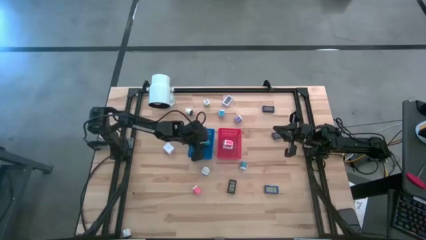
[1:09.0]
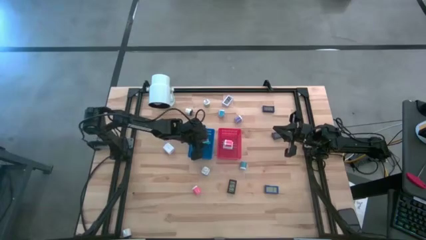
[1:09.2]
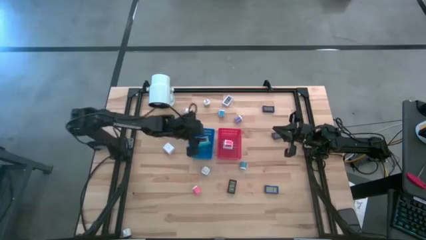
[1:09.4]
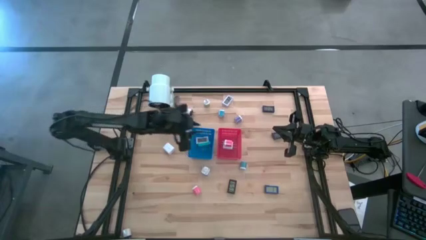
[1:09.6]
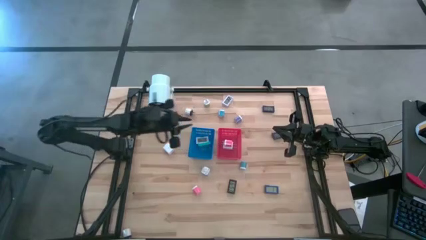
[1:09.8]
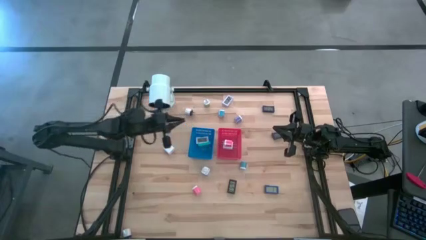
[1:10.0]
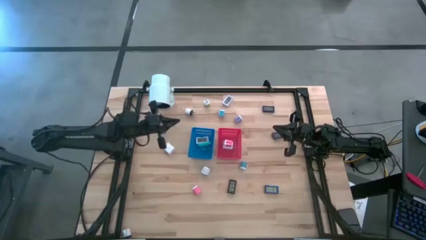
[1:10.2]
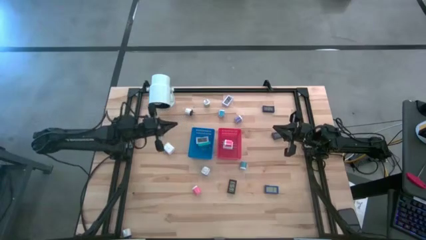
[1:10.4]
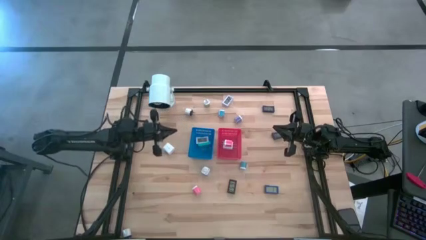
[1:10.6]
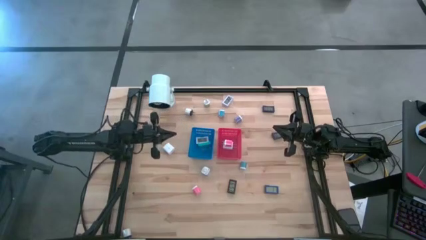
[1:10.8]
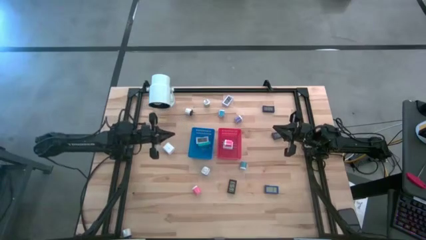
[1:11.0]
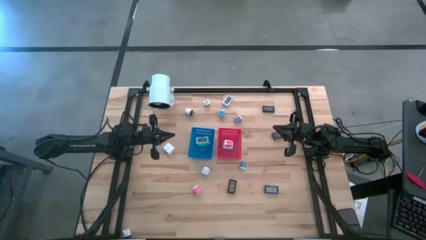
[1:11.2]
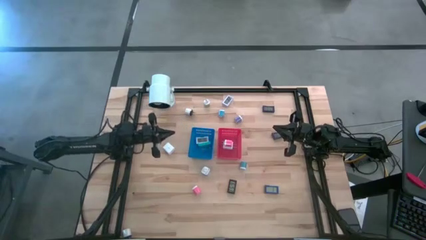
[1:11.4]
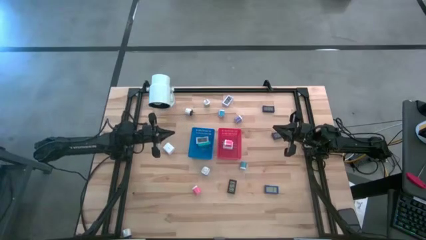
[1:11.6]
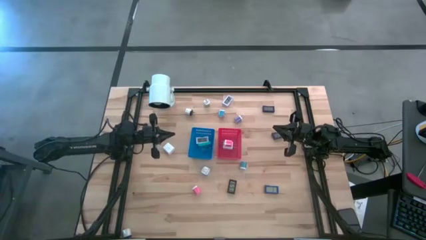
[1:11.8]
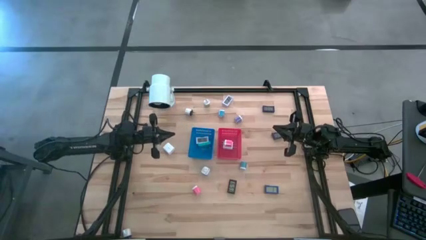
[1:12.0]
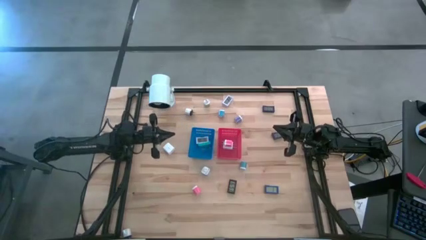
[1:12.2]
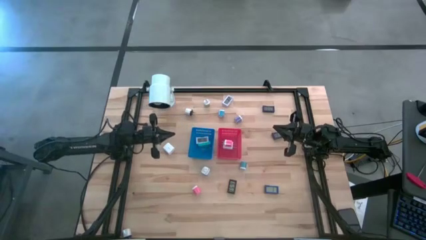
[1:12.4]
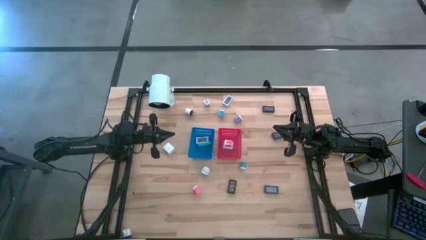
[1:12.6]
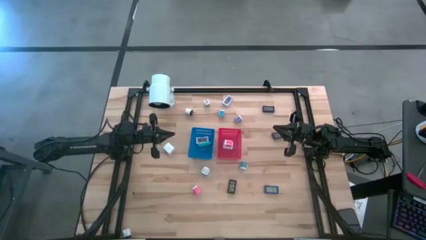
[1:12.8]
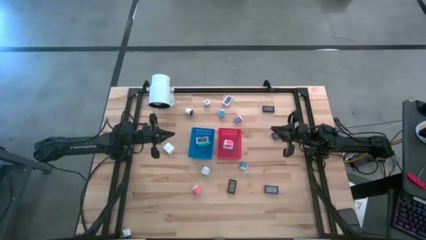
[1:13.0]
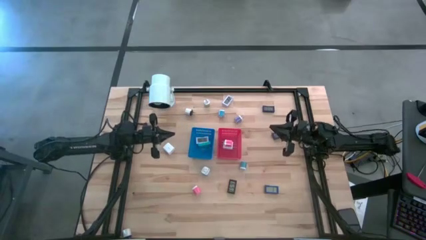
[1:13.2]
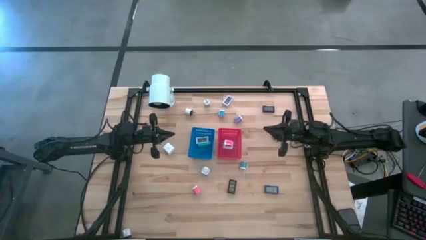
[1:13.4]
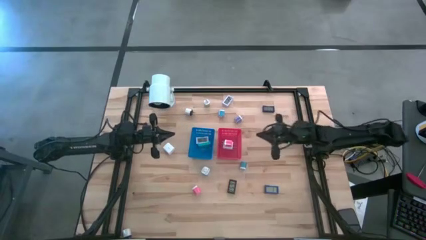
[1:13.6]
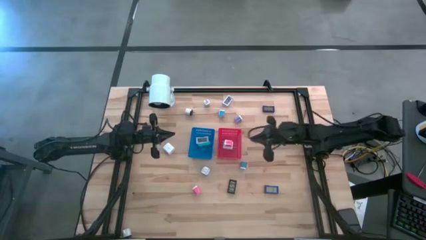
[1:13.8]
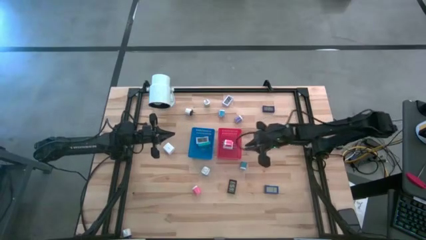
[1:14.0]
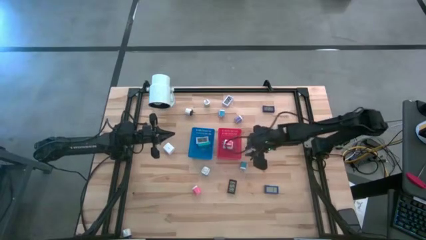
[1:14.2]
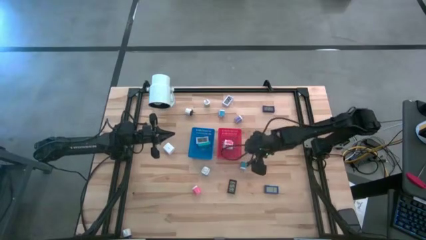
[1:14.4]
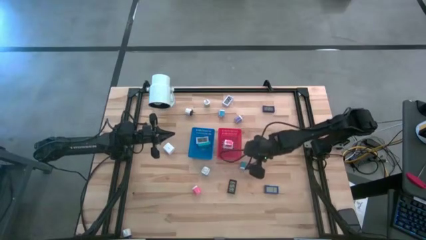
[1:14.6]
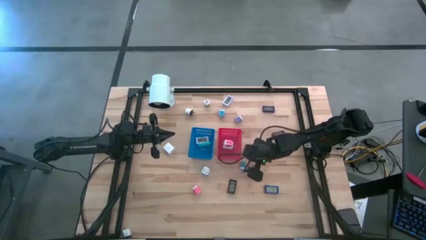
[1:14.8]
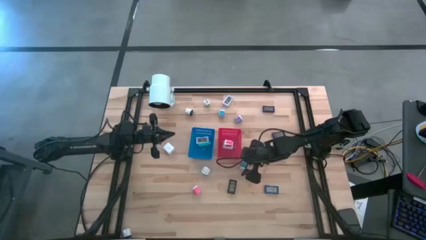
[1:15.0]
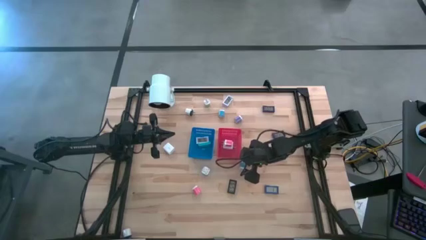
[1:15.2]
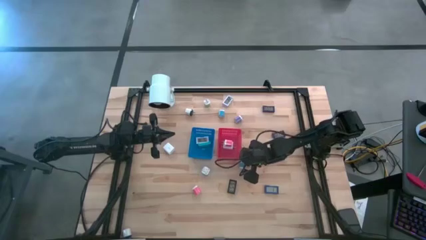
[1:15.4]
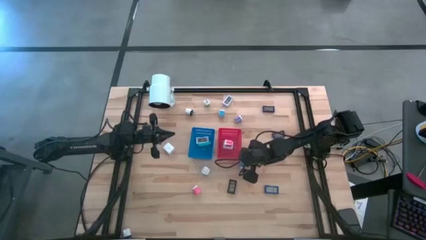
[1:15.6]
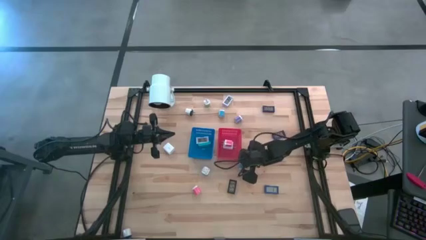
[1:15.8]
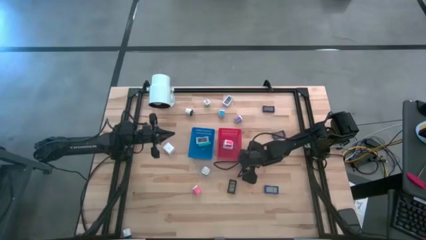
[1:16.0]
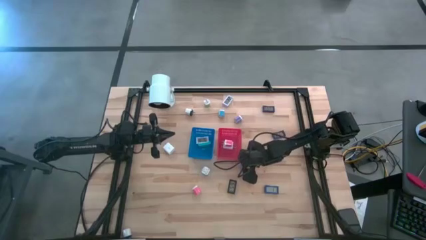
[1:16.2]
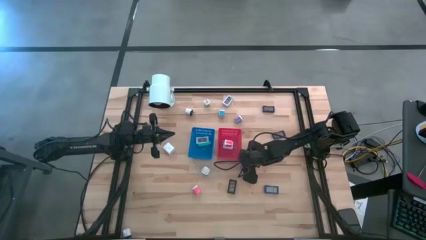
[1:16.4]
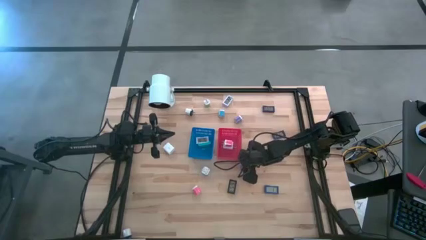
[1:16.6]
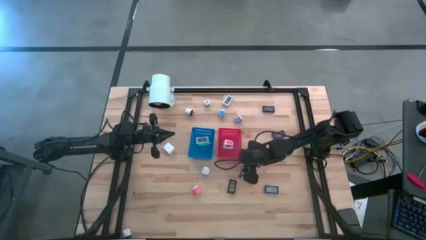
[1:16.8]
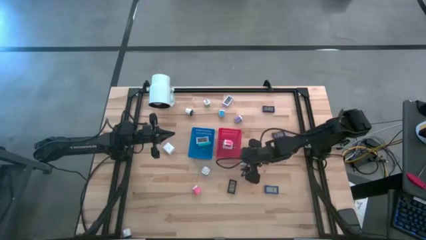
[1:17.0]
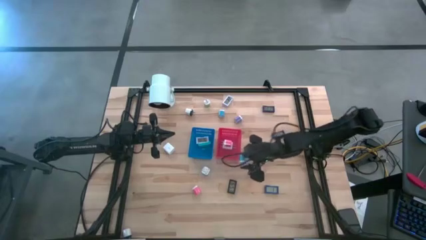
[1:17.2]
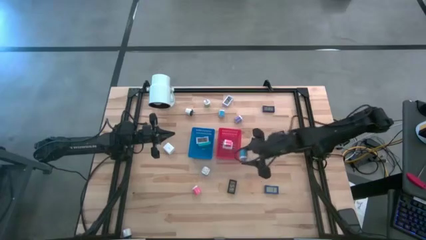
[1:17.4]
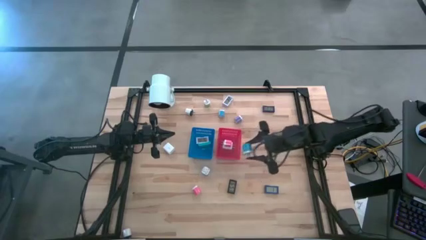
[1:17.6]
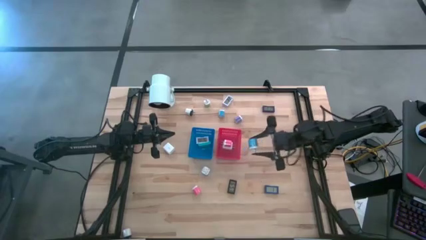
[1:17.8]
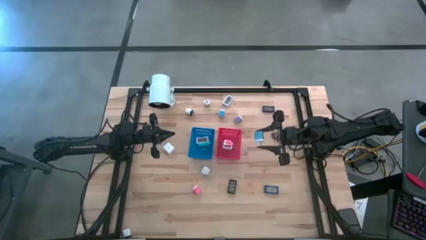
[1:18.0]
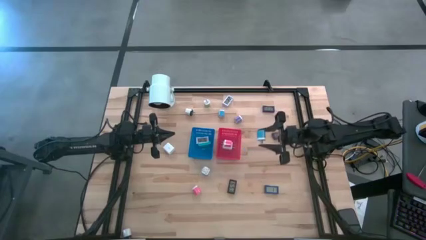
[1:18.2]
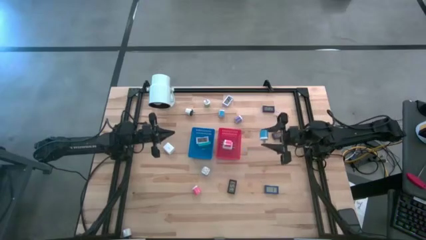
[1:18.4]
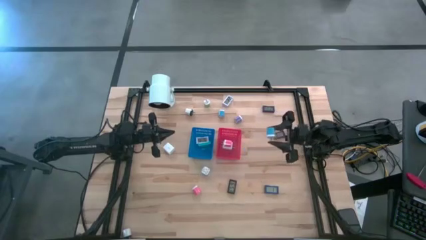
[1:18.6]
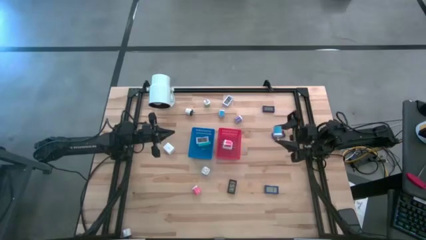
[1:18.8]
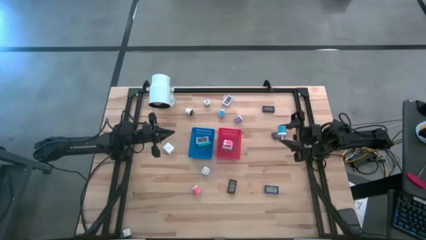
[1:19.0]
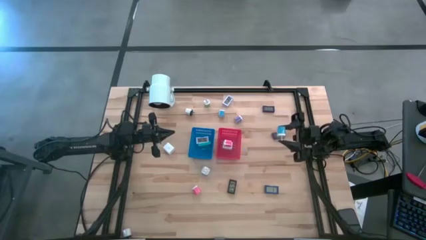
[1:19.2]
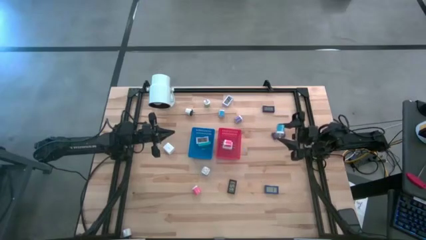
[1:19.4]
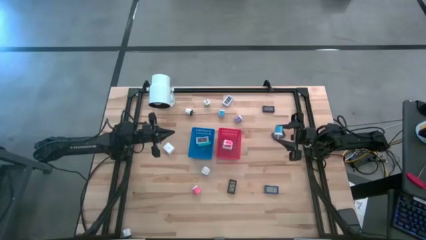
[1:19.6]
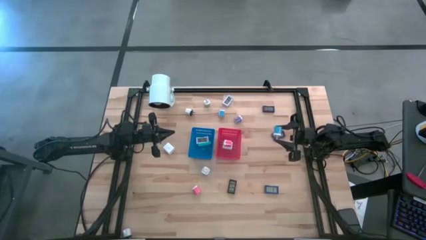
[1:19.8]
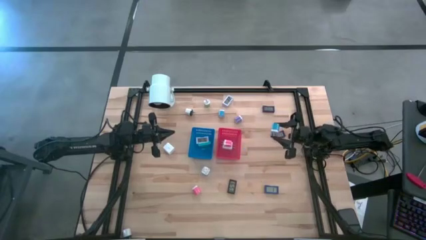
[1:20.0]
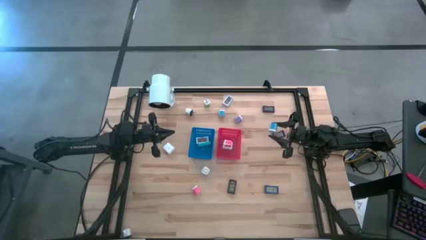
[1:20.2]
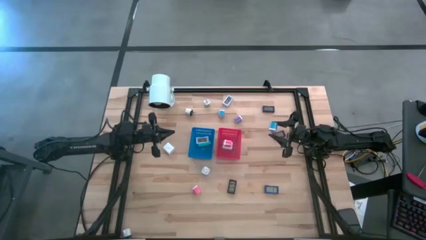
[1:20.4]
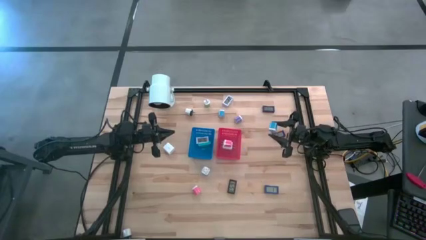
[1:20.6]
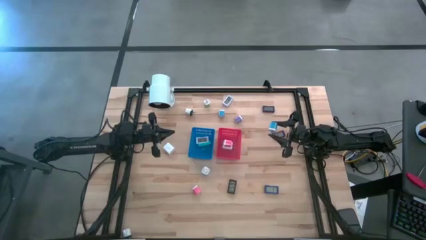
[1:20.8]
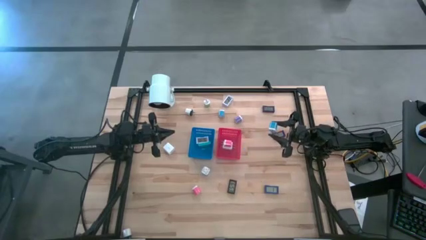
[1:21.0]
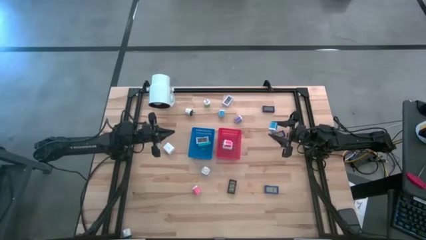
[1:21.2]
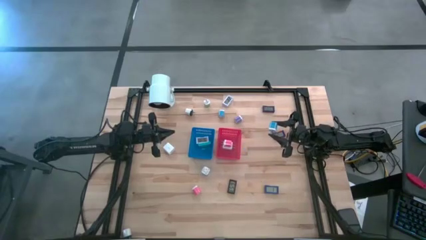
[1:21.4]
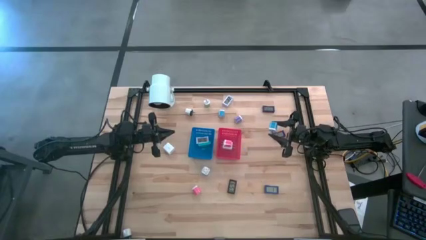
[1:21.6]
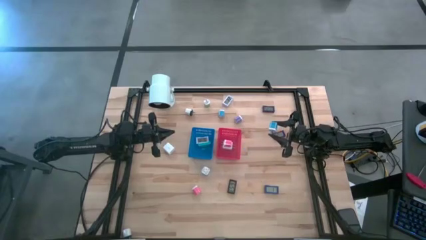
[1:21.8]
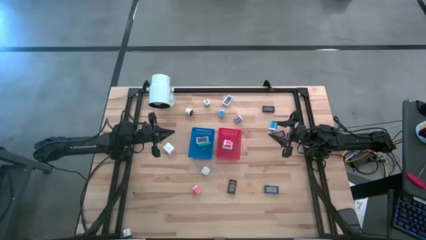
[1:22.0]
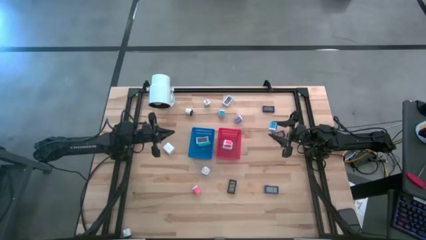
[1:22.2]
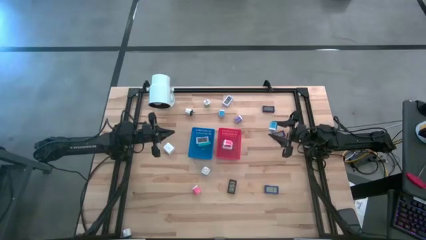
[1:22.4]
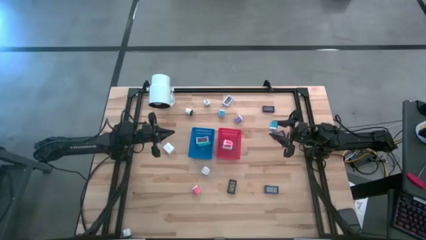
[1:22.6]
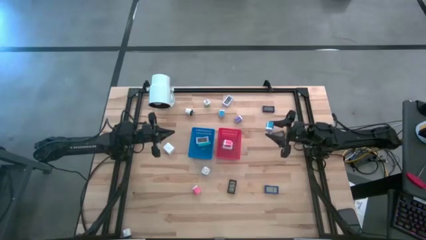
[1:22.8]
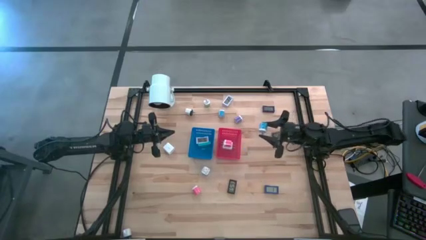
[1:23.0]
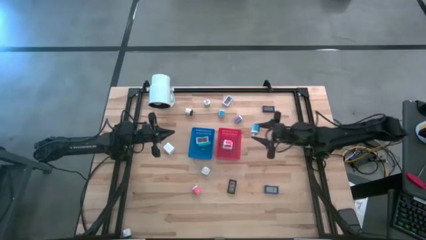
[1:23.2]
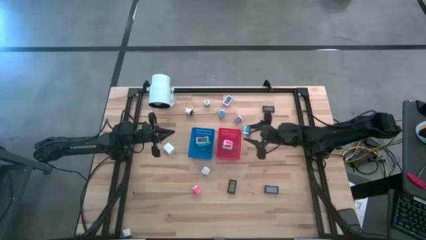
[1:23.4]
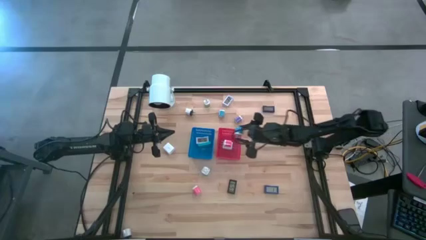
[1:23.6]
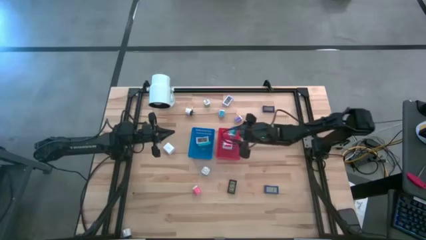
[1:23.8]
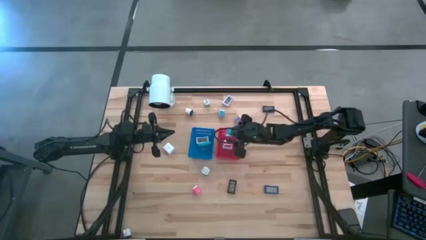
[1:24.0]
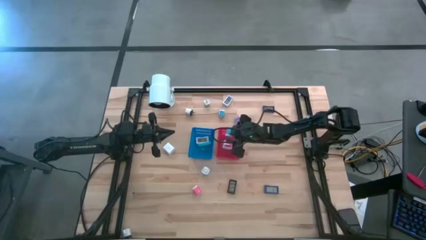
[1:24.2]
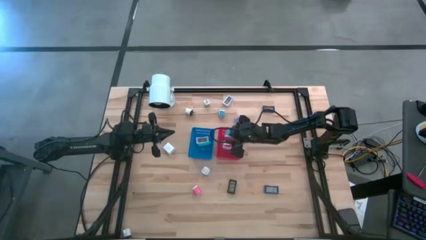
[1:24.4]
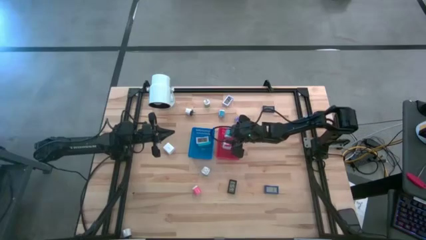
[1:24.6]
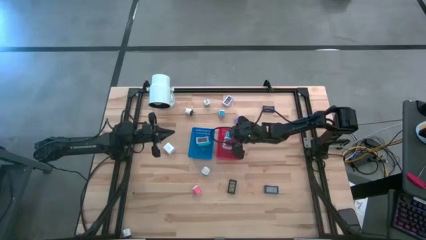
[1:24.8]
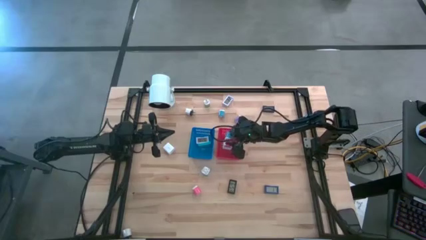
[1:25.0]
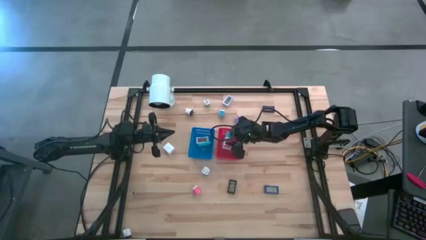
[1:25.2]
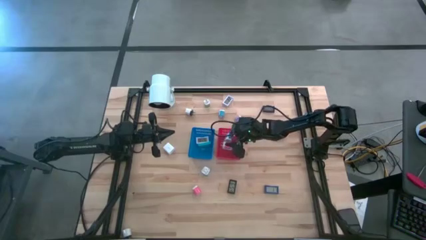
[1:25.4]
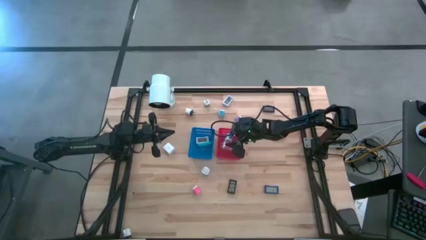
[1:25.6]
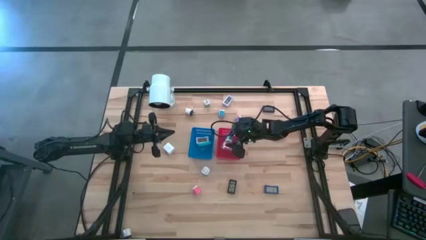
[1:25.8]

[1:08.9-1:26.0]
Task: Pick & Place Office items
Put the blue charger adapter into the red bin
